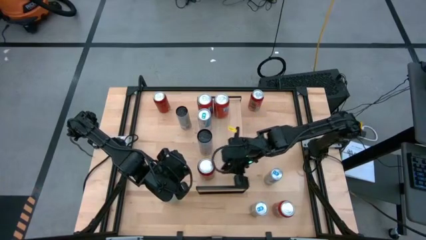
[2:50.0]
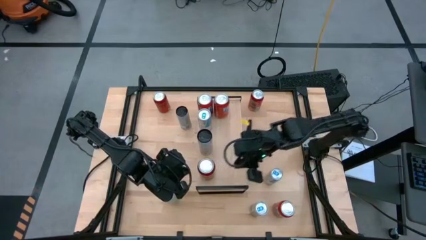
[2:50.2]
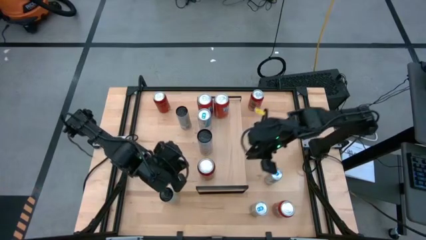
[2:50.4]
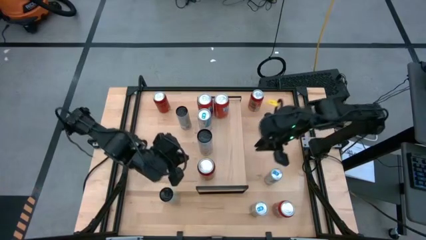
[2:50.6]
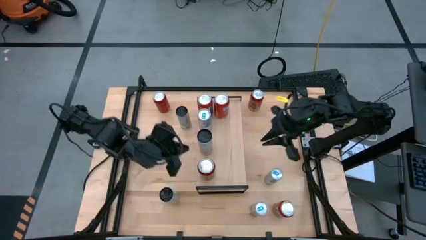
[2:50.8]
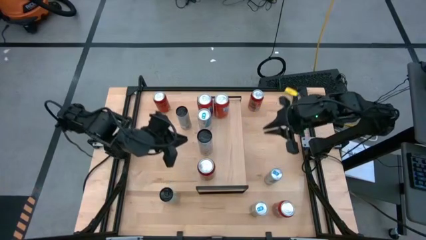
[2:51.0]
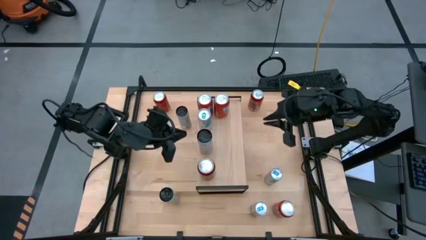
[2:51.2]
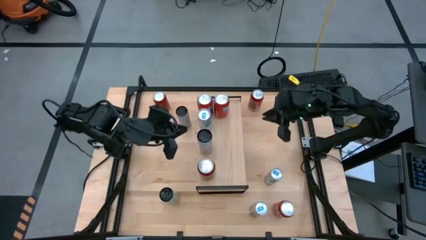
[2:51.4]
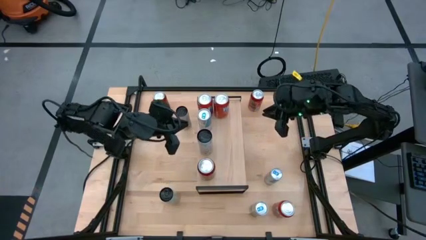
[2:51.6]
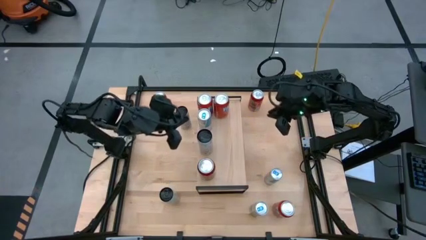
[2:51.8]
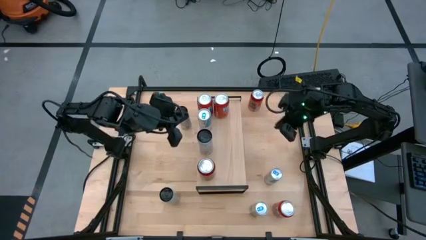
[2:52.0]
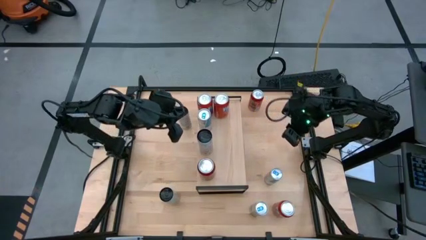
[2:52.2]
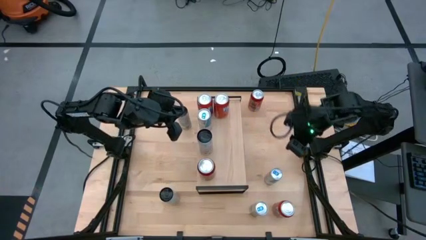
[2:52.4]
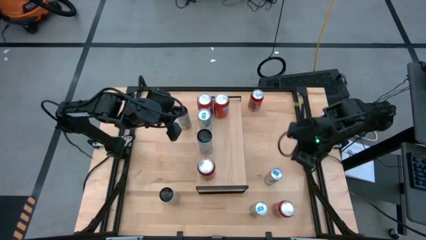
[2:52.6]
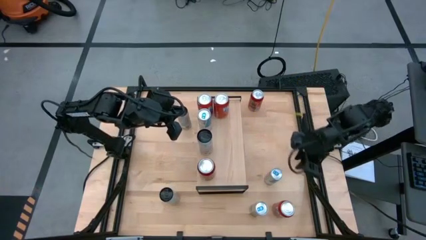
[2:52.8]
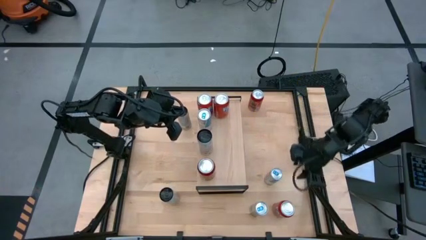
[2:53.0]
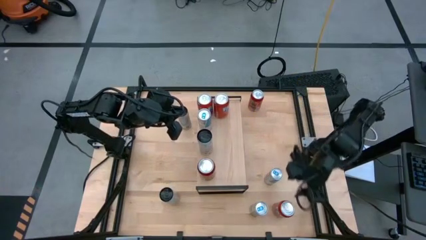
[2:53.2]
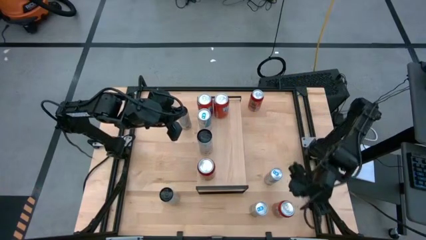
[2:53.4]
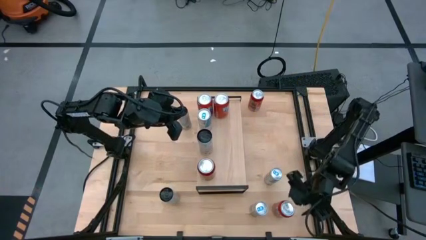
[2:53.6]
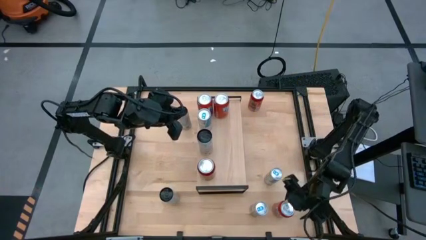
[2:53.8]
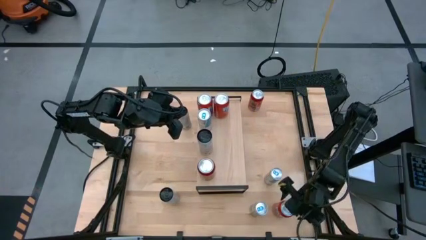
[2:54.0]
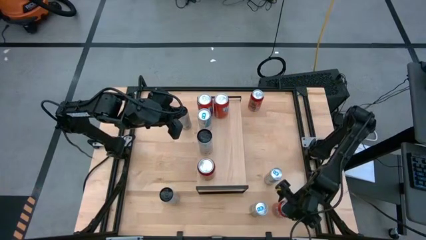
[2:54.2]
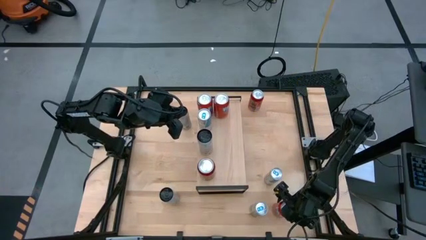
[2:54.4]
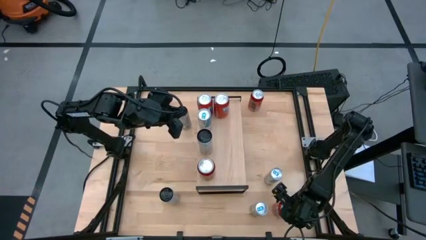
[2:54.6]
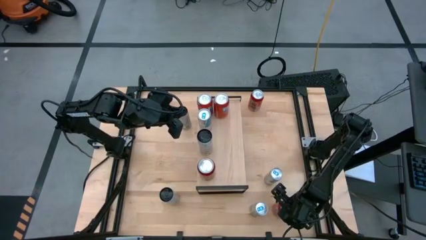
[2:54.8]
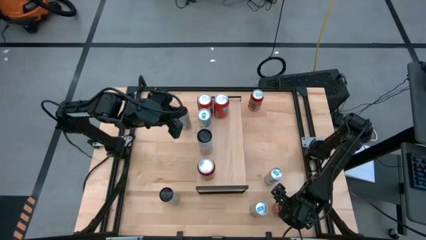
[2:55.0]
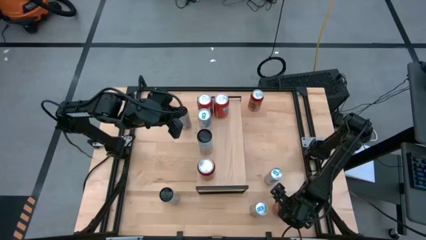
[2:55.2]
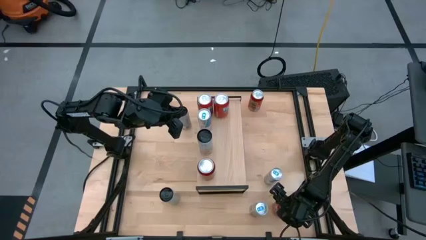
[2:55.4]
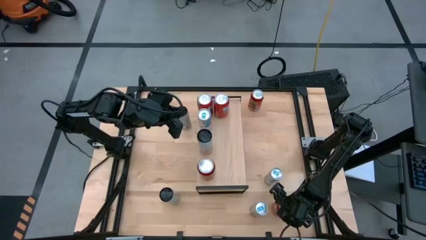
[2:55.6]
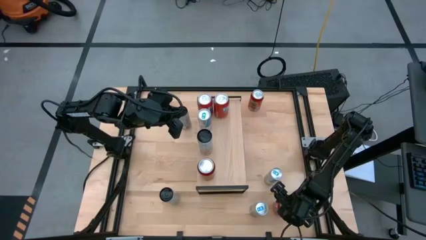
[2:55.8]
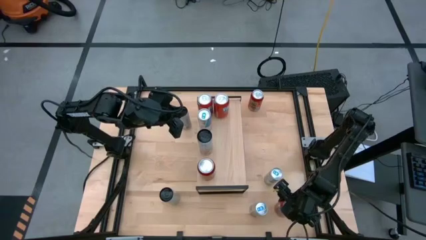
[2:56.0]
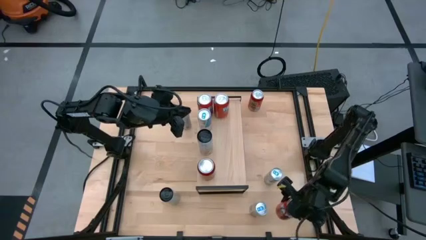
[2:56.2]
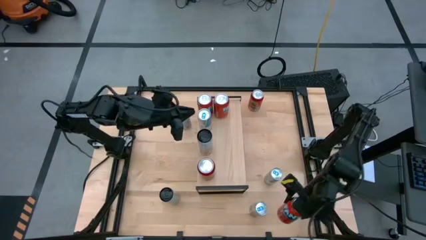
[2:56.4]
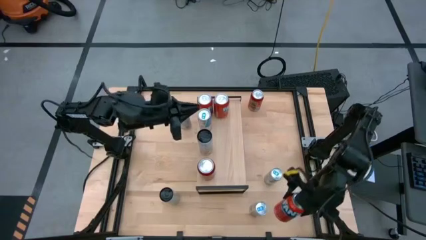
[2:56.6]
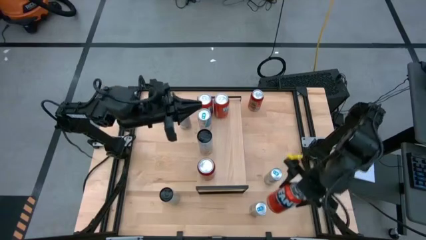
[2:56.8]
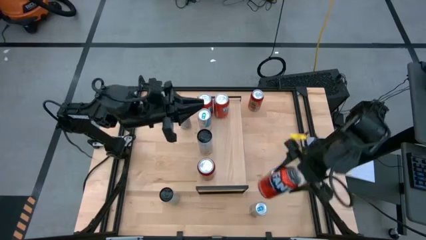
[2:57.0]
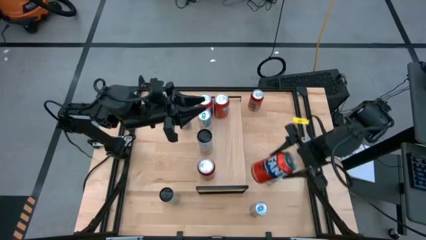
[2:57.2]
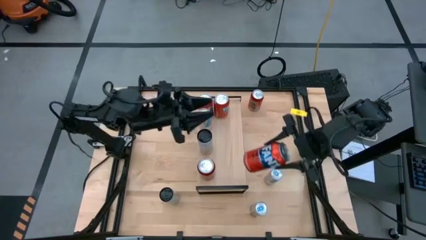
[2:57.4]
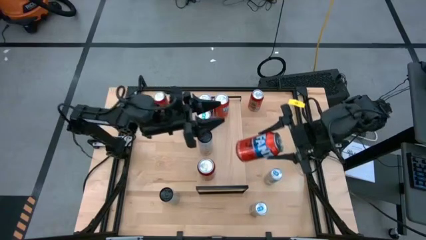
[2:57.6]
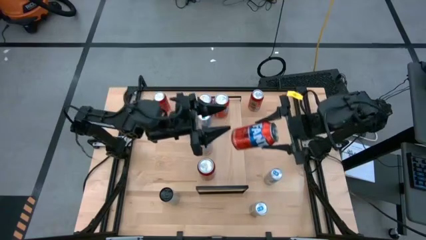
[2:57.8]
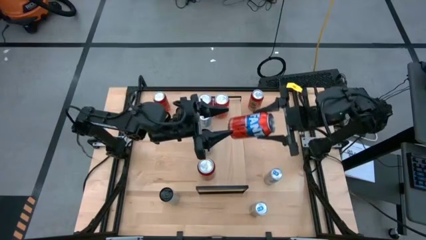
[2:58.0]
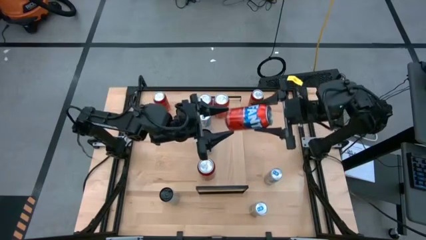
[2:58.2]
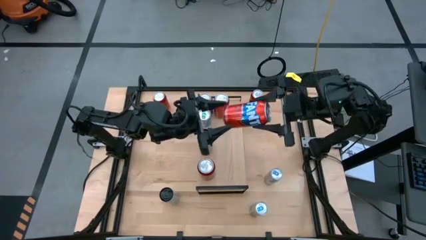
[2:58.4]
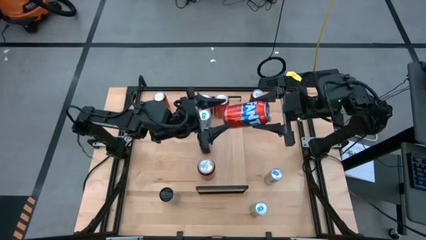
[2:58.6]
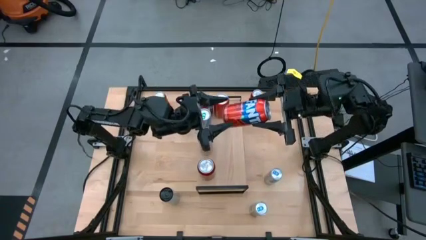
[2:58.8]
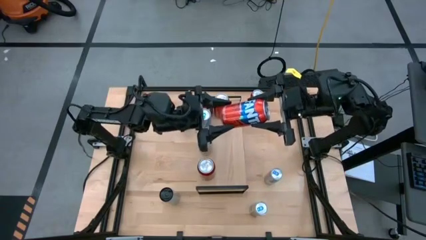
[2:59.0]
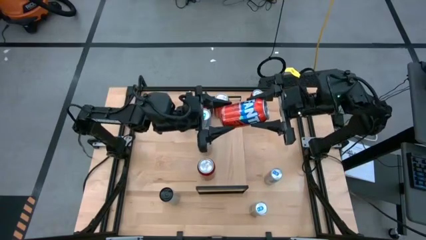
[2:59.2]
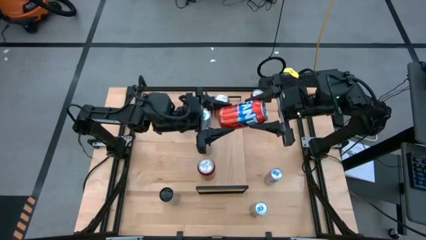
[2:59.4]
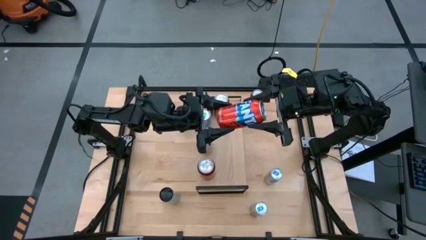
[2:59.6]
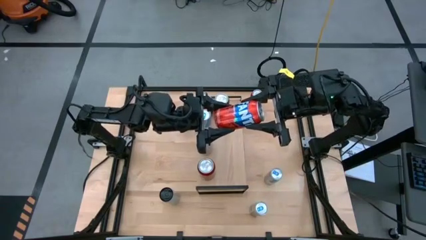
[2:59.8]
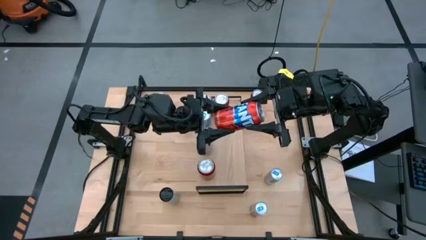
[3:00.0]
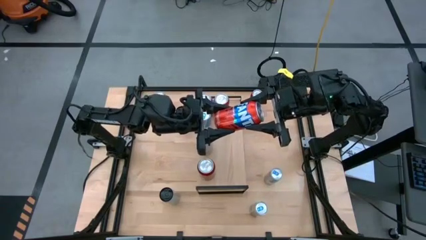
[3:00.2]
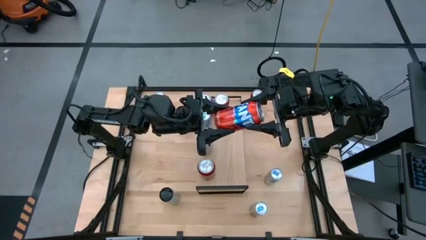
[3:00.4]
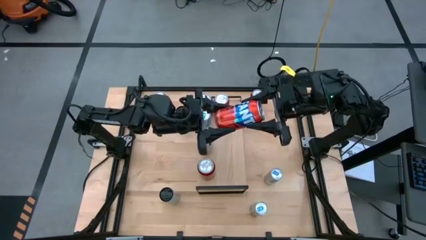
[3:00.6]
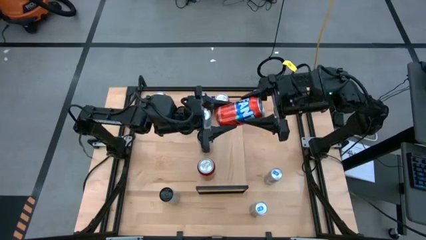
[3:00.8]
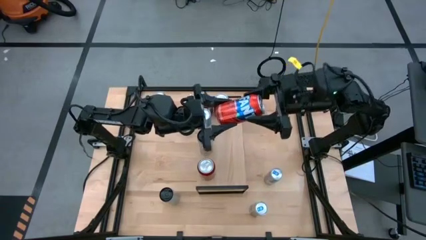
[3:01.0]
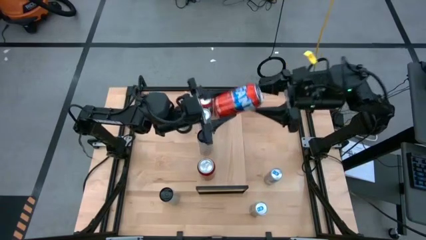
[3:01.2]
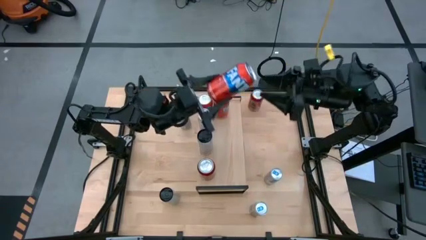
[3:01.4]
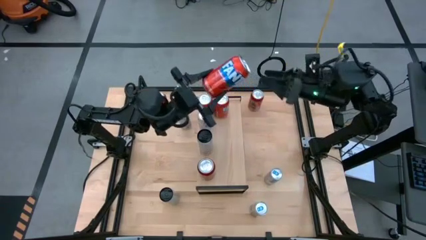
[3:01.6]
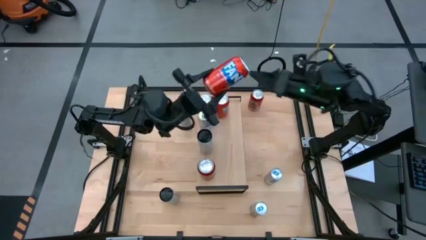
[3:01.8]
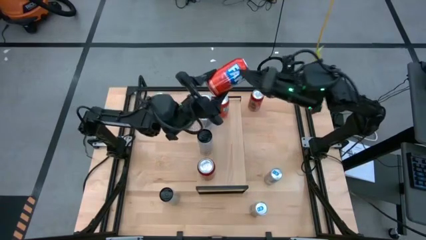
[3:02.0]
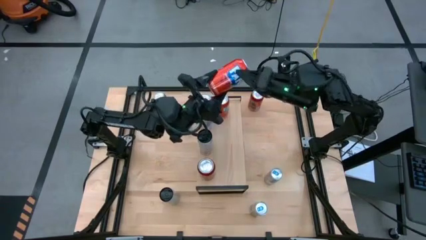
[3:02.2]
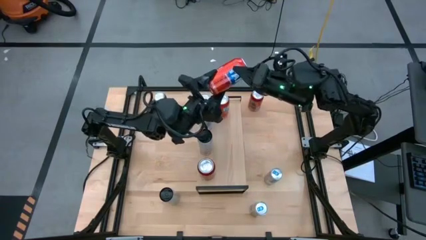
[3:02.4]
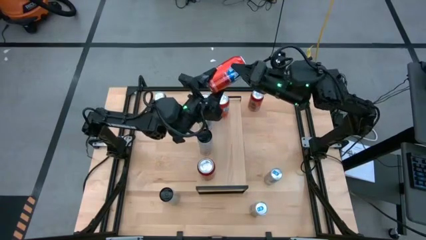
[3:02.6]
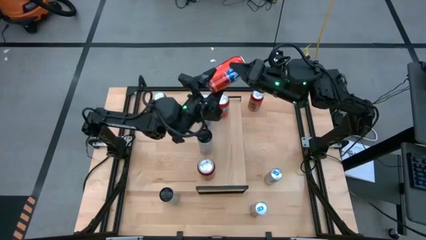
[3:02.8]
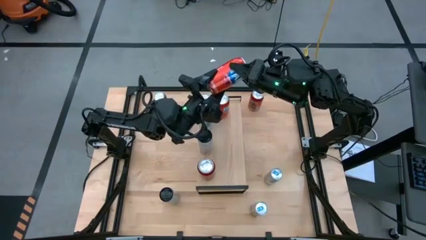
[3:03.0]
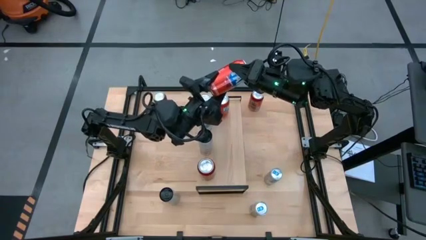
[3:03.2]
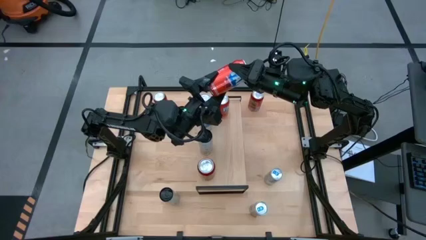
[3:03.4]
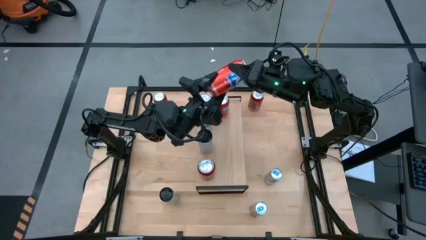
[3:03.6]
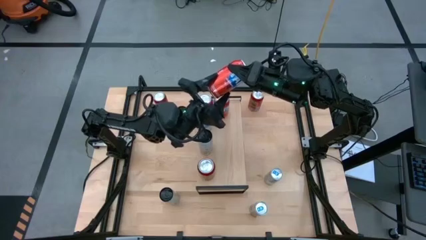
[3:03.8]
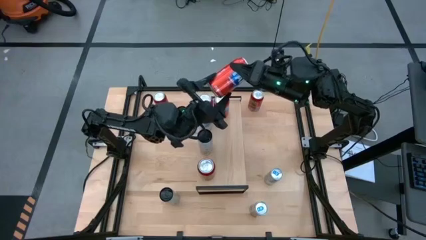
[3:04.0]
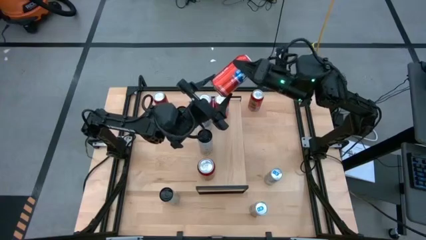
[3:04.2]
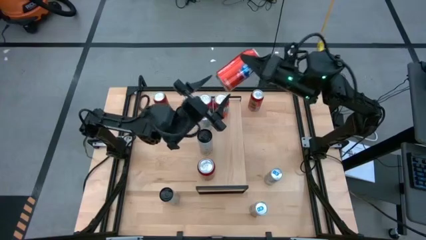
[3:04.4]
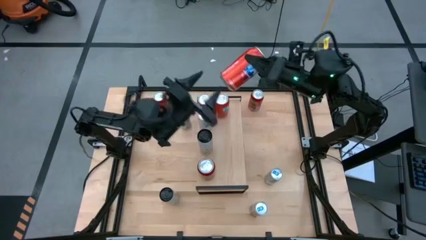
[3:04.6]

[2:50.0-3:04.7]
Task: Place canned beverage on shelf
Put the orange soda can on the shelf aligned with the other orange soda can
